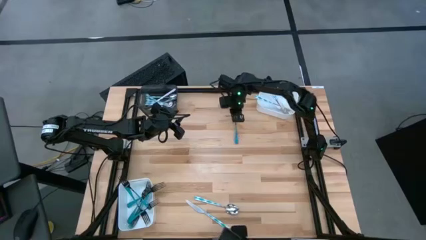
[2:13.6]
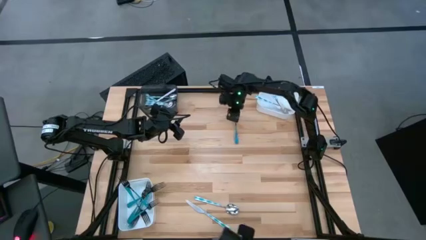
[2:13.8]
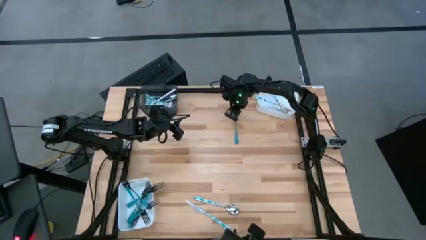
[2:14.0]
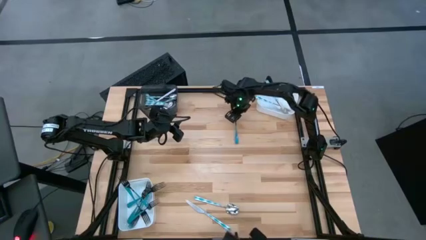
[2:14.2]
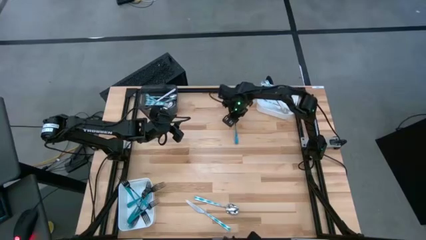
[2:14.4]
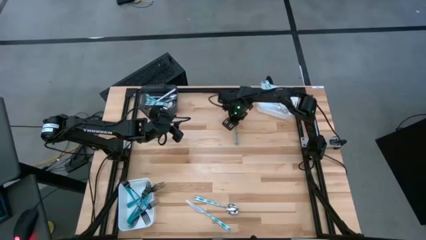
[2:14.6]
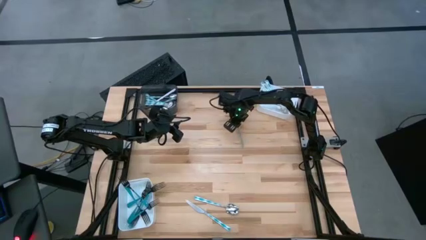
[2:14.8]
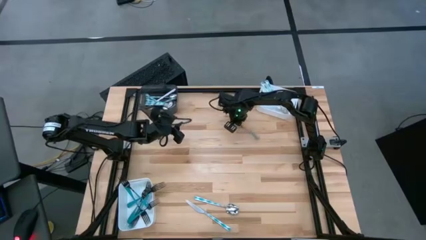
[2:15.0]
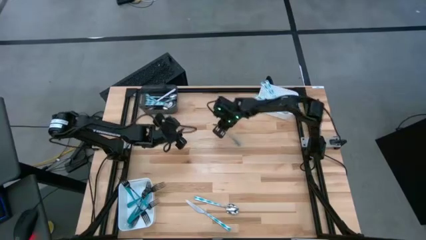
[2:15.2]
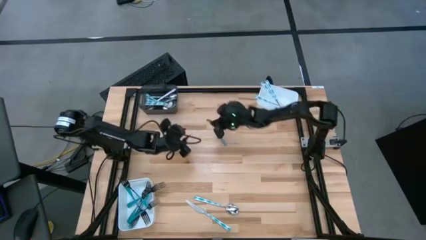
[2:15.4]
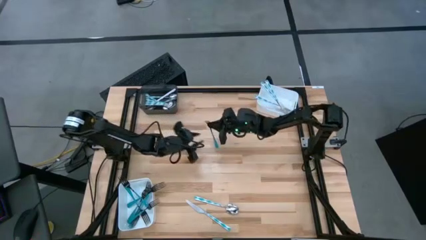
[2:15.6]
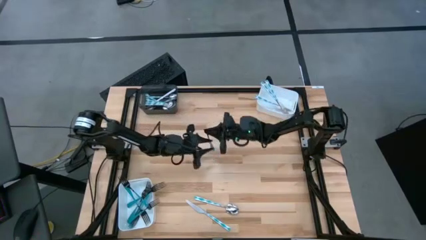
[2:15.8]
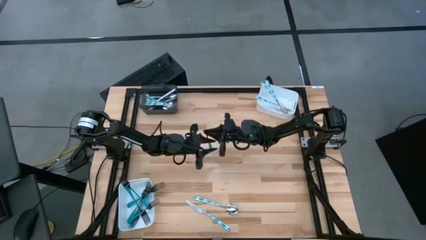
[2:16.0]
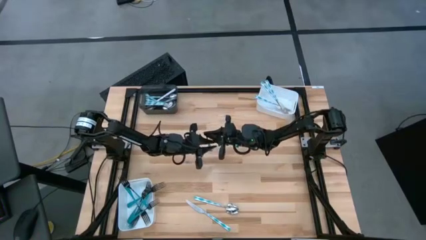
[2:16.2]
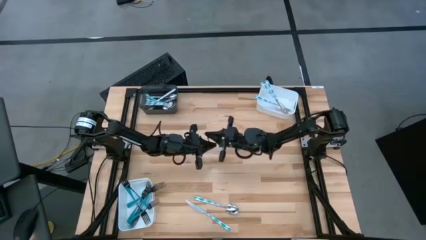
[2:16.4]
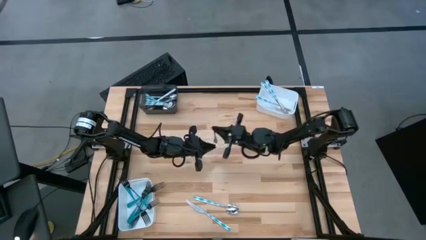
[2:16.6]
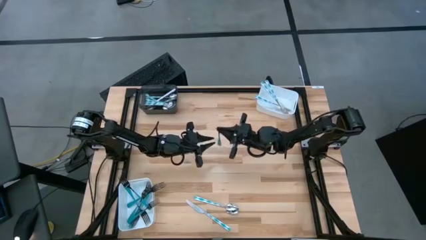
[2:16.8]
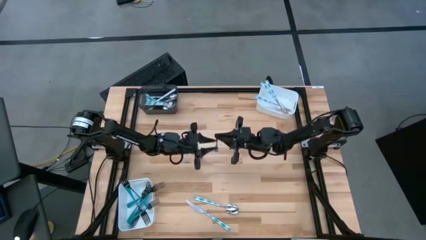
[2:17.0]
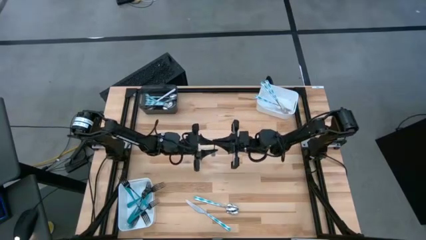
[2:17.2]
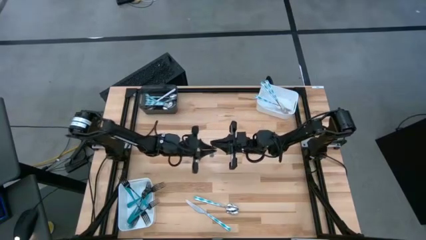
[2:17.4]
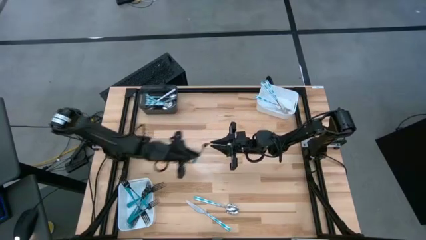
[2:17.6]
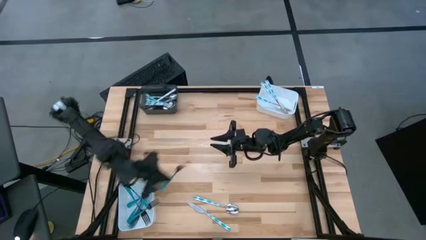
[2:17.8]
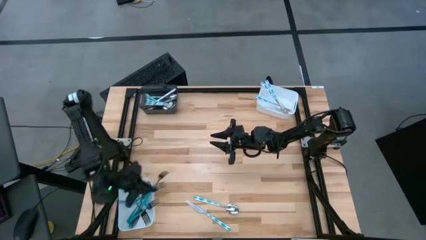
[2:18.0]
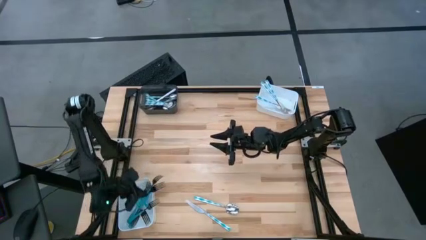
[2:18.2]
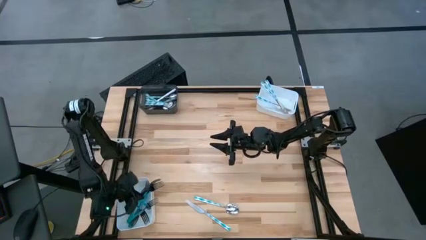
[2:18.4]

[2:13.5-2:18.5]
Task: Sort silverware by color (type)
Put the blue fork into the bottom white bin

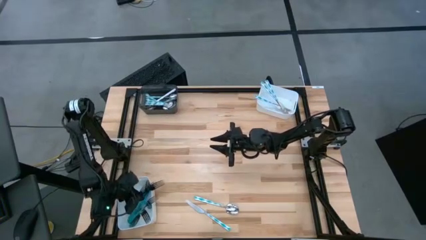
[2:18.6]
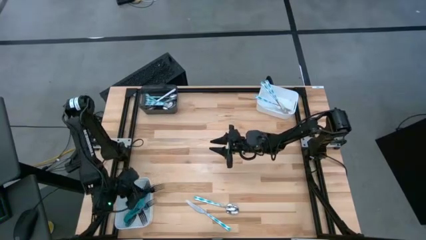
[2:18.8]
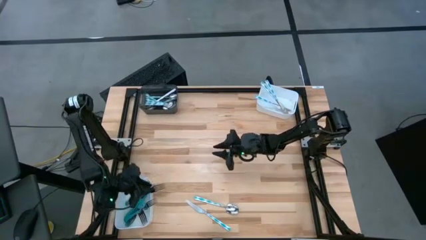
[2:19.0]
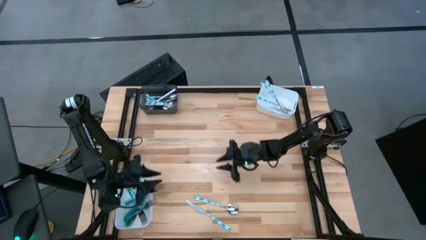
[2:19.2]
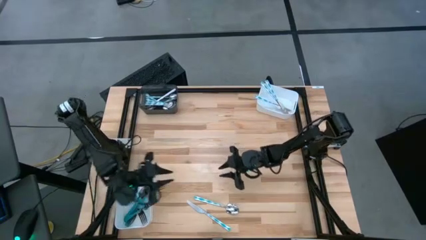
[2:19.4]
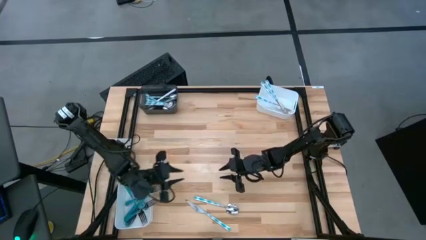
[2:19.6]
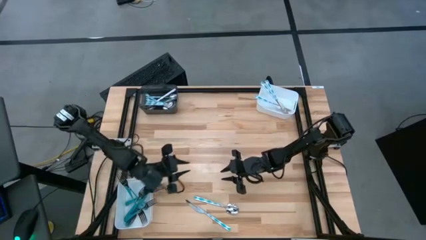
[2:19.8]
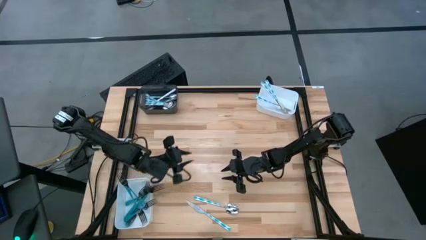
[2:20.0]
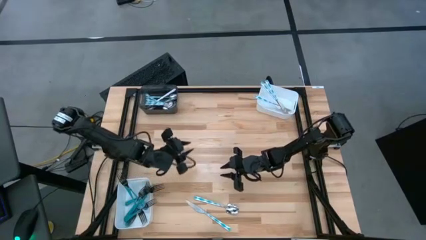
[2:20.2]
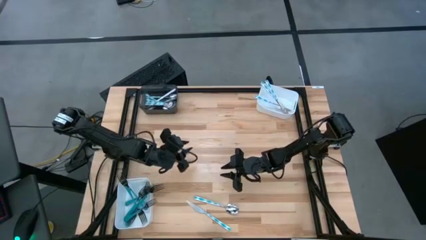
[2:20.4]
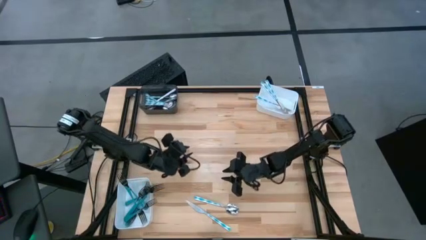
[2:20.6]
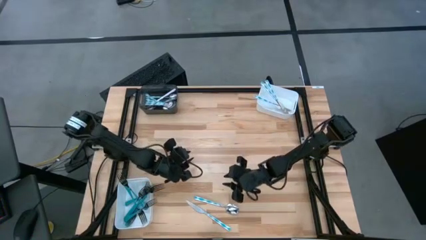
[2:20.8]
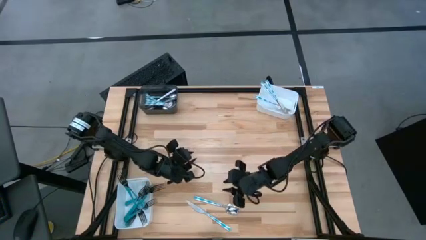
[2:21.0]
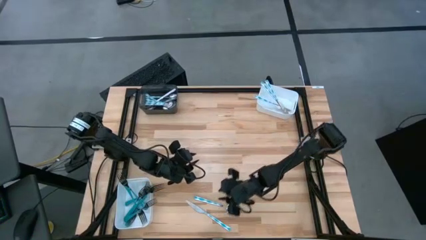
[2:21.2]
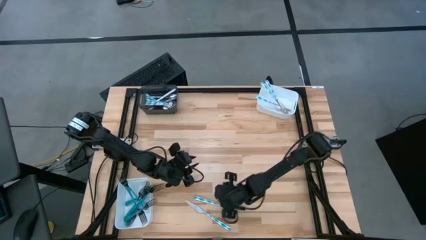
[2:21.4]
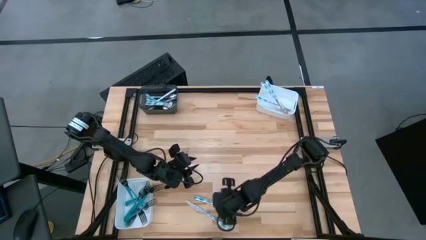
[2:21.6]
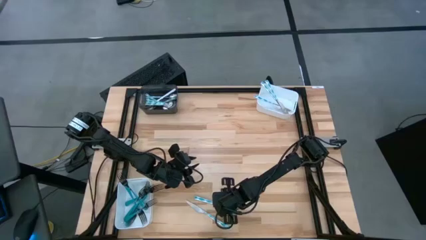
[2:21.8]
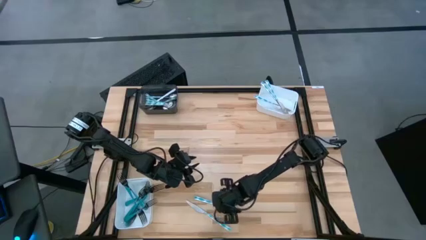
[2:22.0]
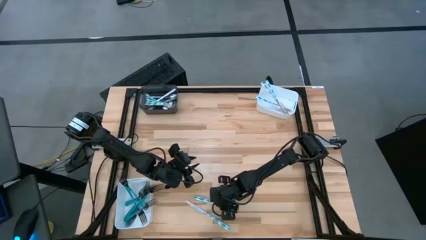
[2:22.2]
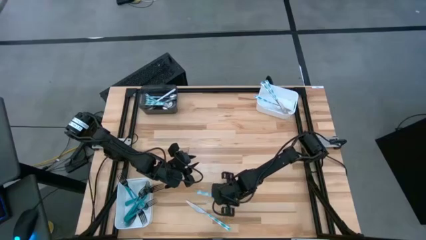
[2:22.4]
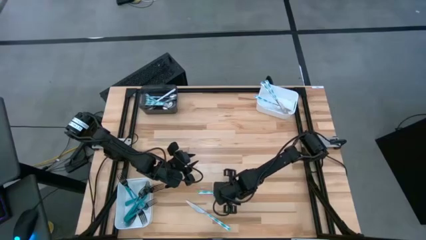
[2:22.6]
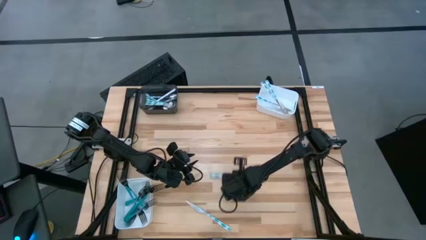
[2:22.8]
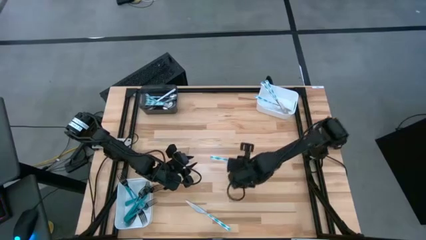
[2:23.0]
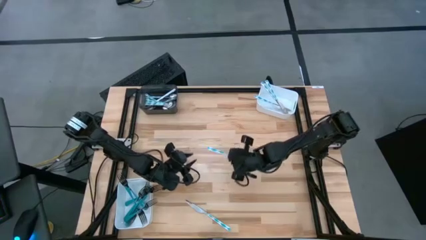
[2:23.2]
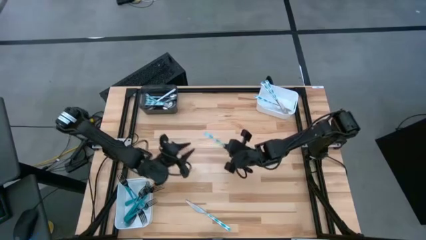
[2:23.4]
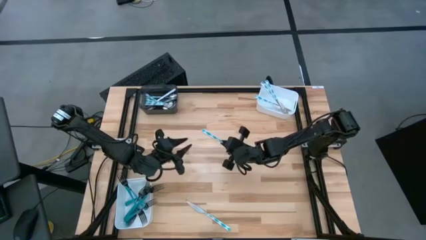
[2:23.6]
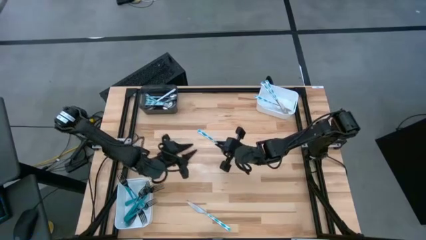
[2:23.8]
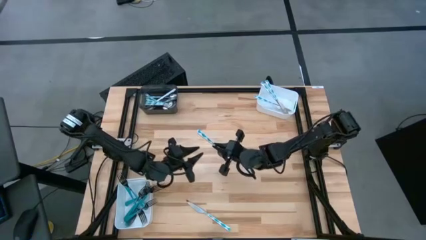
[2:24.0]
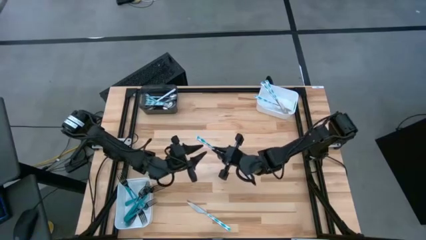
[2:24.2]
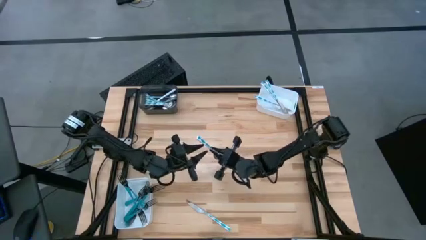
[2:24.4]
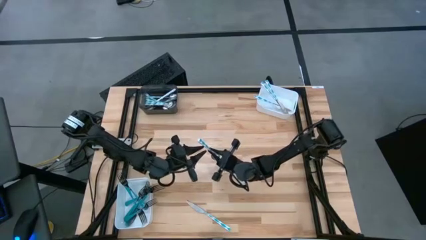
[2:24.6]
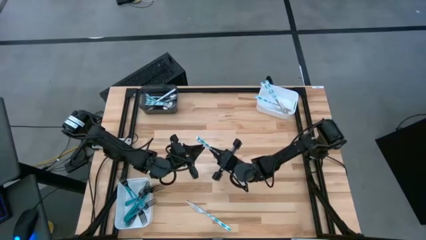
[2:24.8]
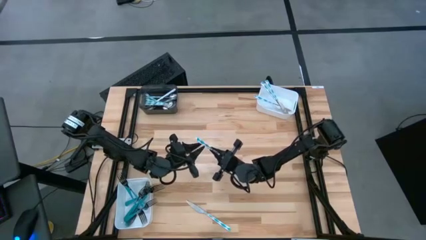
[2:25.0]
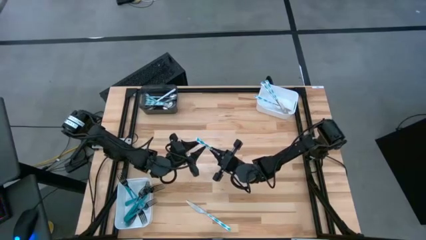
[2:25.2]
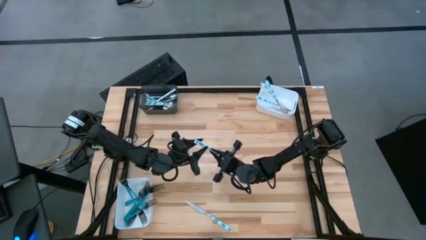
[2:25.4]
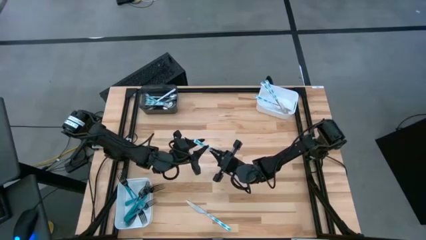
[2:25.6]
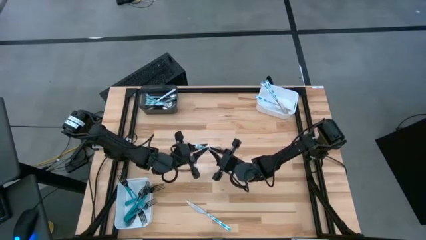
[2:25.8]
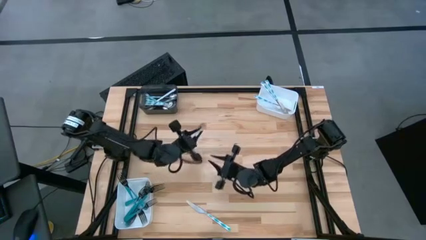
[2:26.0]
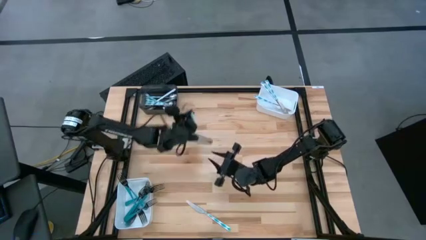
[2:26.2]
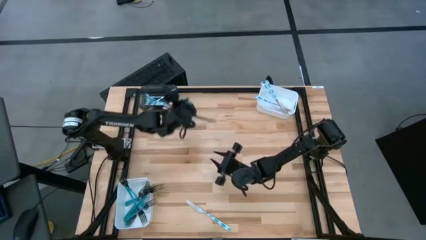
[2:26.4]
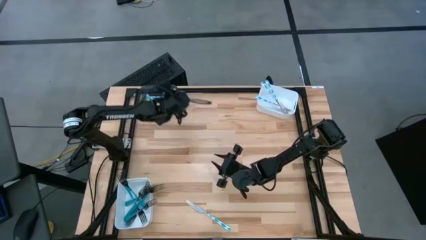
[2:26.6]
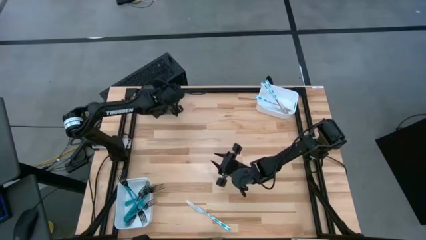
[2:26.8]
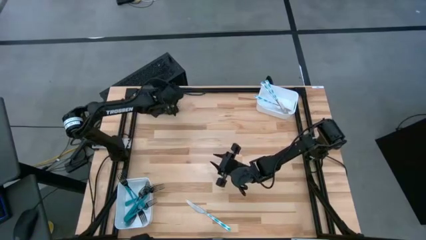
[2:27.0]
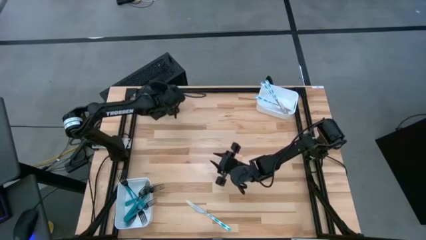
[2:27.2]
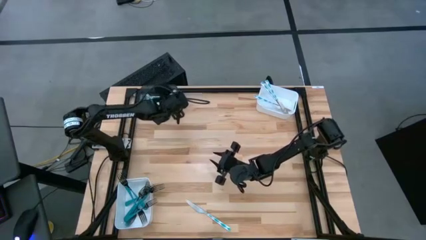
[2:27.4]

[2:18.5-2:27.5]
Put the blue patterned spoon into the black bin
